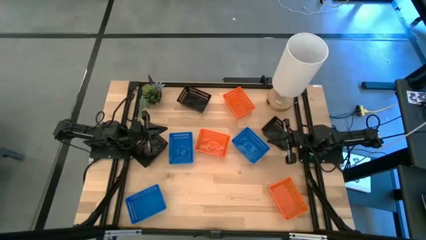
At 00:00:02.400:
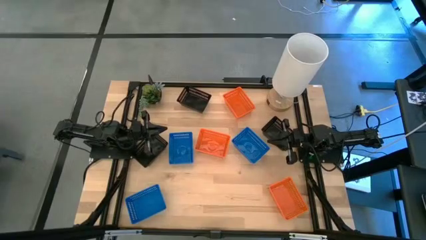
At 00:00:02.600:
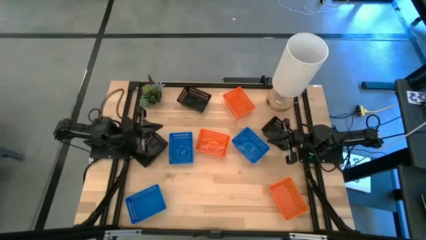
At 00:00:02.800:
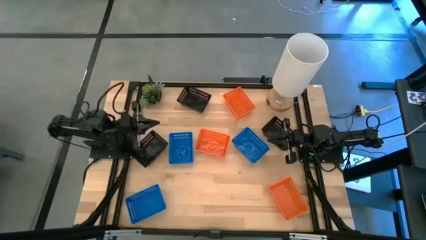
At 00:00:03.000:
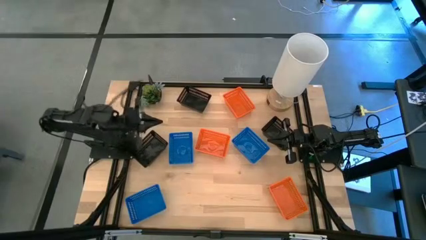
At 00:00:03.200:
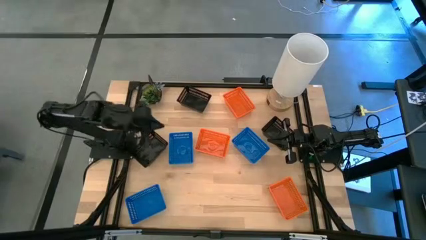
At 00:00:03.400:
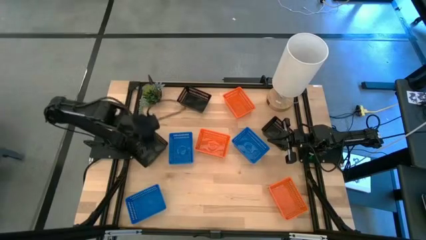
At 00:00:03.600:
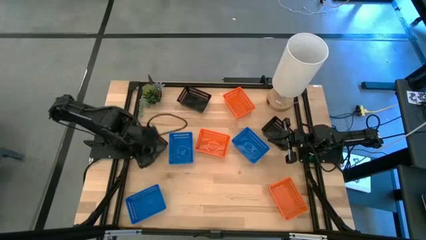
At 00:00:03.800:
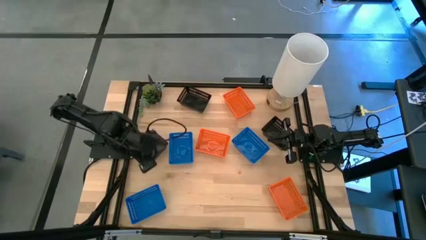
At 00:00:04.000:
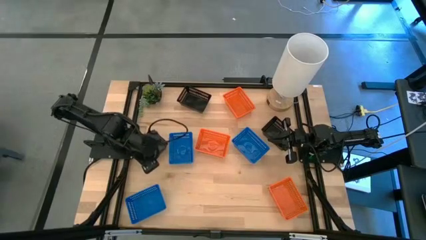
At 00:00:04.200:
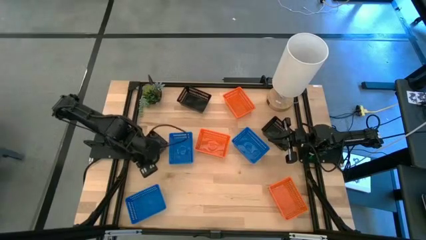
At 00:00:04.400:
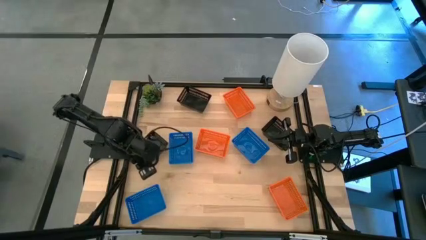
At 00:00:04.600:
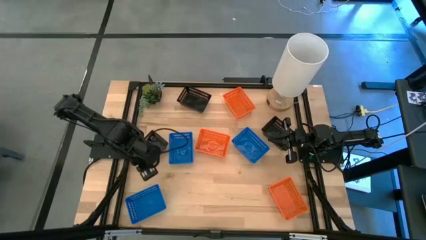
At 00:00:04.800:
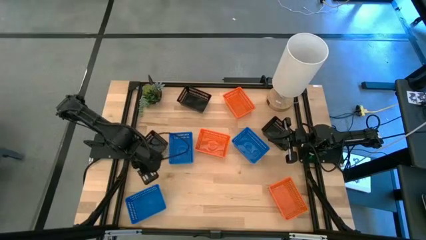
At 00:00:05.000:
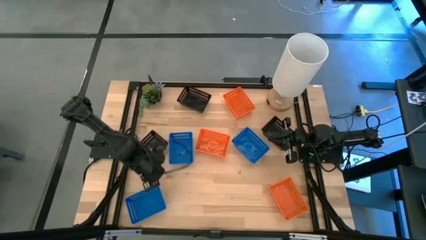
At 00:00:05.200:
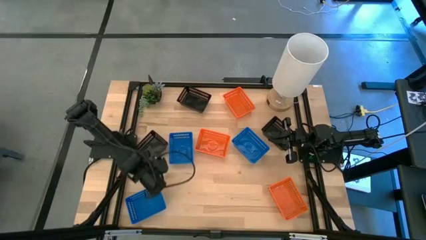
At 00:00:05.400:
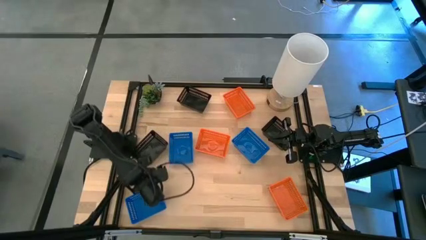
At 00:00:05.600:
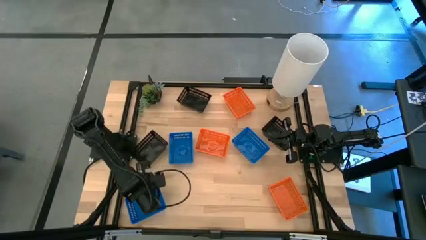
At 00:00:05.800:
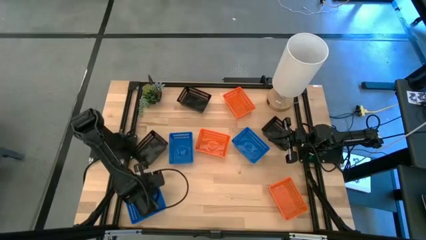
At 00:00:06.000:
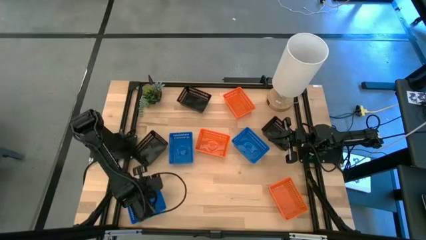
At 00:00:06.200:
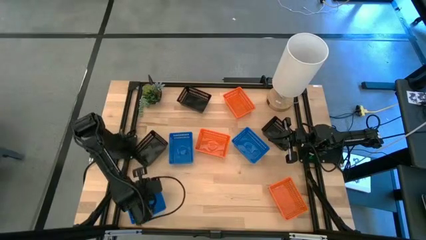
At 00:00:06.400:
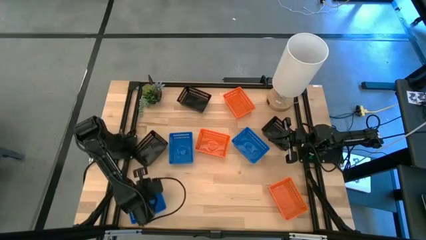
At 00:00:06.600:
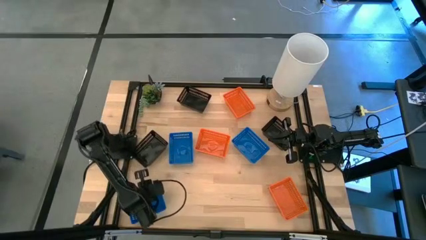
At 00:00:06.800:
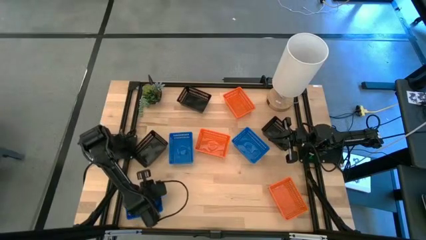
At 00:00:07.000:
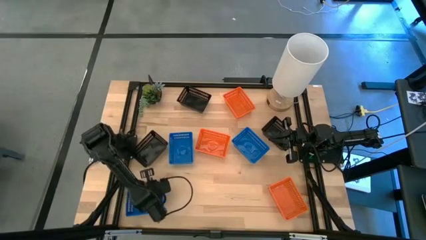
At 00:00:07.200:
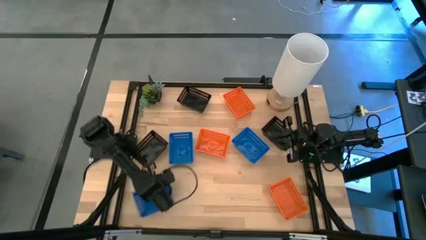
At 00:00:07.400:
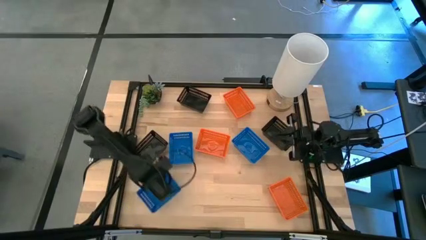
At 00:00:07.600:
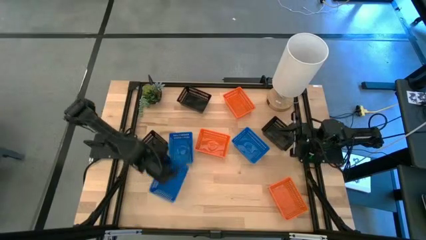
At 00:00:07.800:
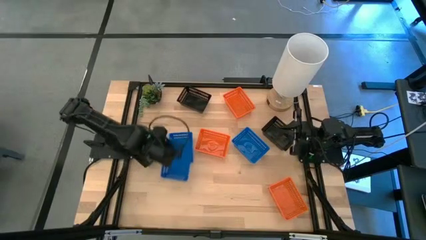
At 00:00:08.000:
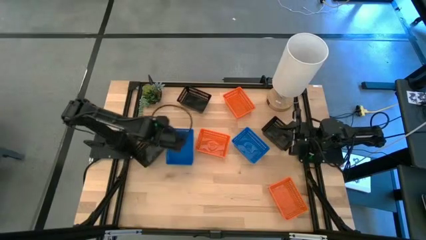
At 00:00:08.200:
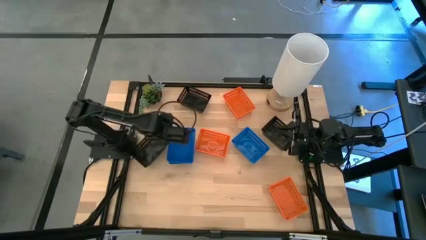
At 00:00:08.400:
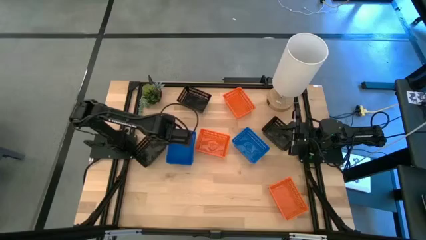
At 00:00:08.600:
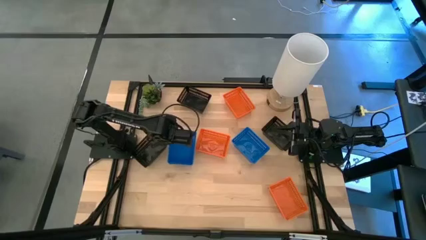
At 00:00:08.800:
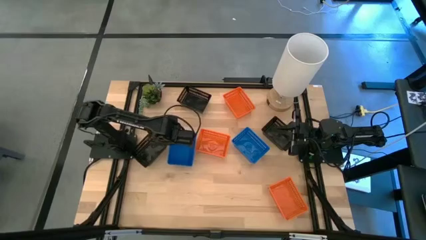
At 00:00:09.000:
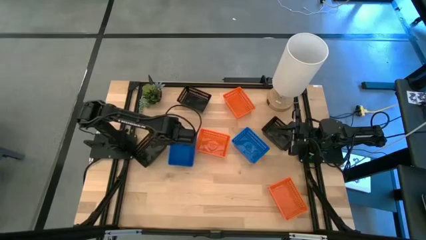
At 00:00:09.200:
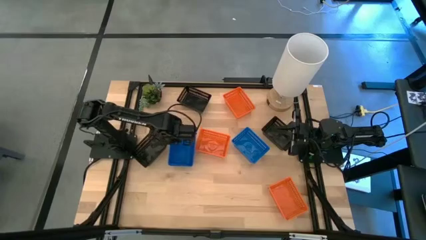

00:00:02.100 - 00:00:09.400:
Stack the bottom blue bin on the top left blue bin

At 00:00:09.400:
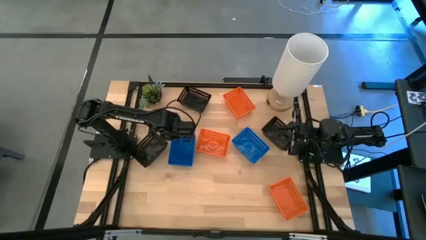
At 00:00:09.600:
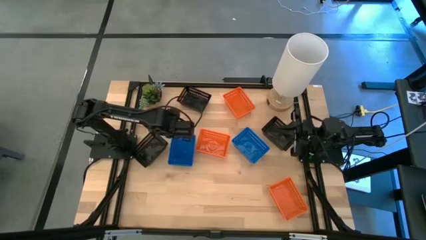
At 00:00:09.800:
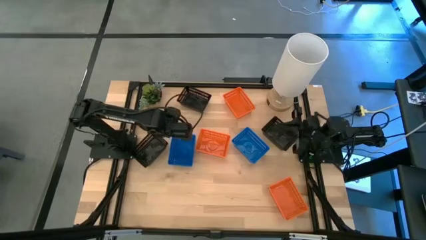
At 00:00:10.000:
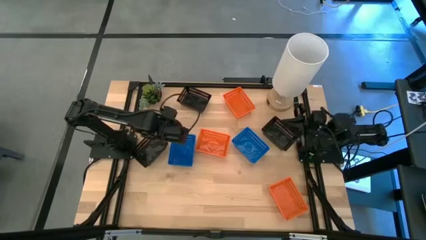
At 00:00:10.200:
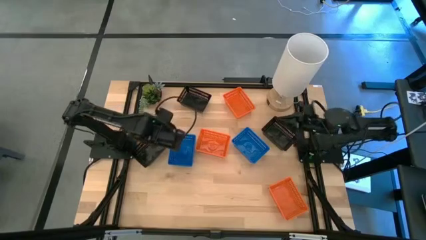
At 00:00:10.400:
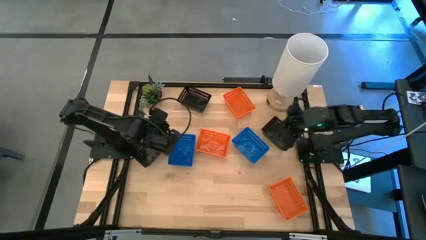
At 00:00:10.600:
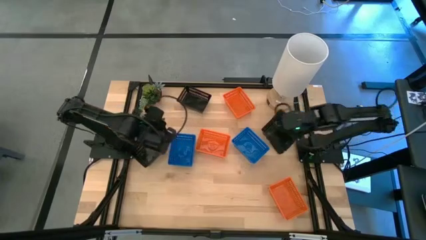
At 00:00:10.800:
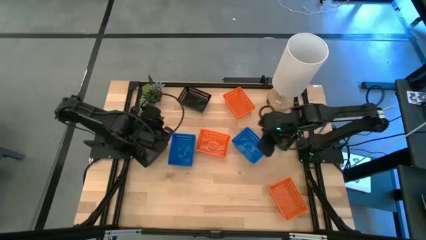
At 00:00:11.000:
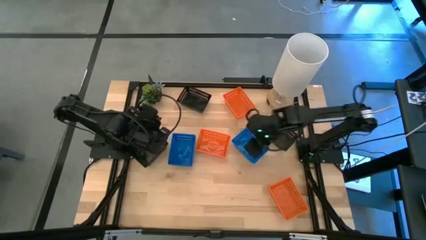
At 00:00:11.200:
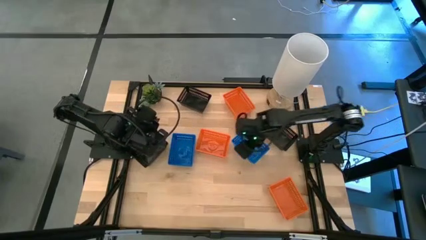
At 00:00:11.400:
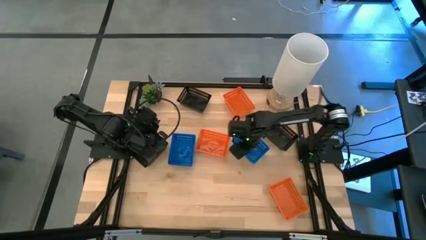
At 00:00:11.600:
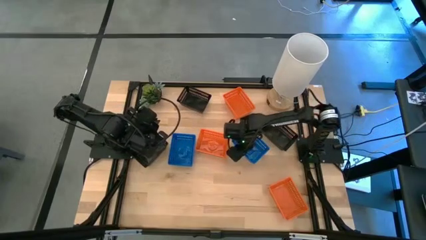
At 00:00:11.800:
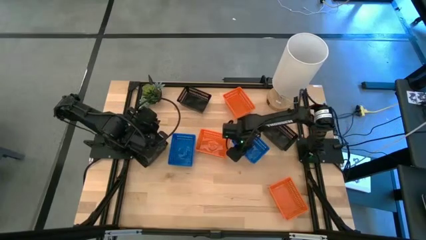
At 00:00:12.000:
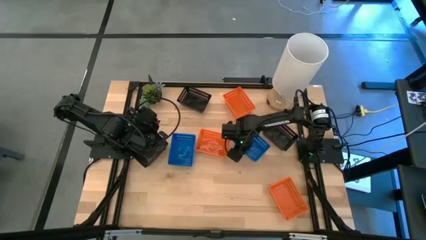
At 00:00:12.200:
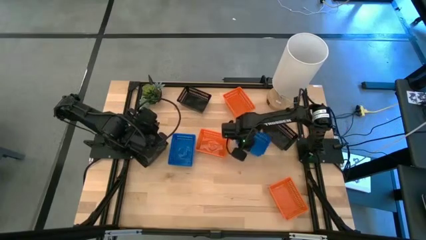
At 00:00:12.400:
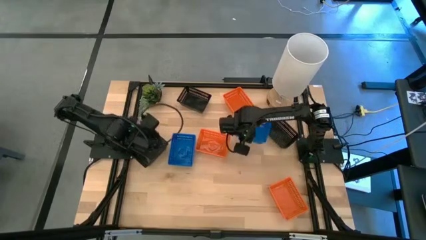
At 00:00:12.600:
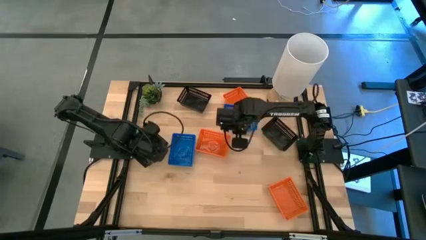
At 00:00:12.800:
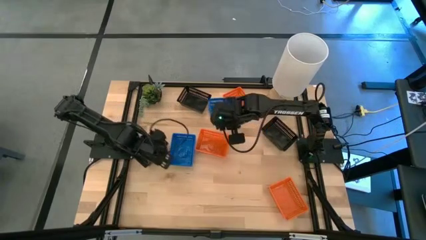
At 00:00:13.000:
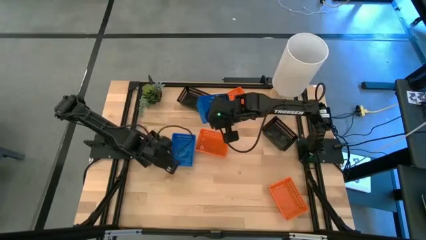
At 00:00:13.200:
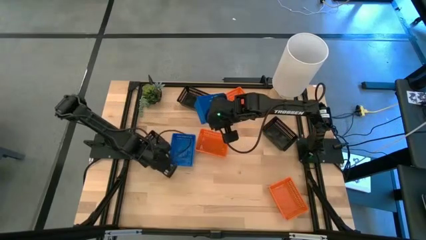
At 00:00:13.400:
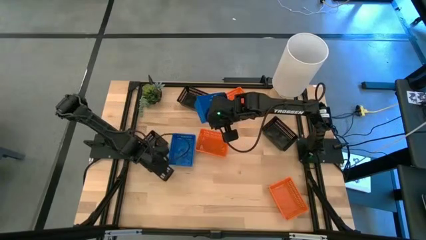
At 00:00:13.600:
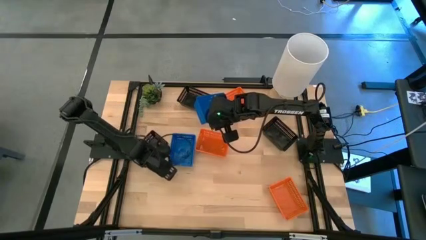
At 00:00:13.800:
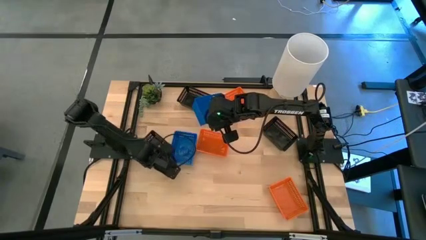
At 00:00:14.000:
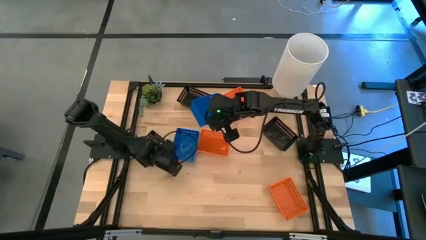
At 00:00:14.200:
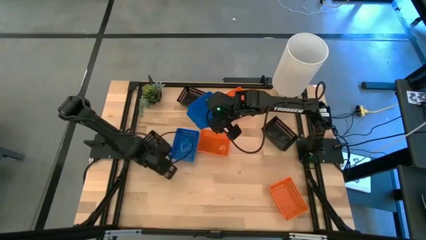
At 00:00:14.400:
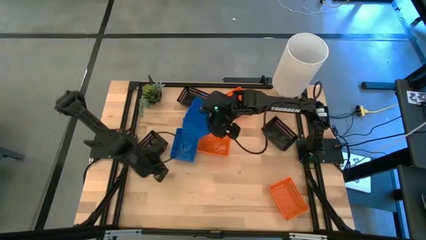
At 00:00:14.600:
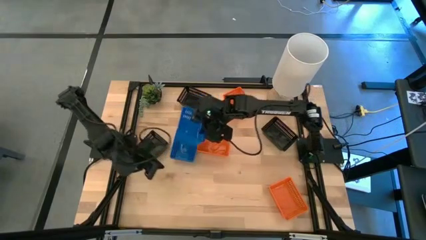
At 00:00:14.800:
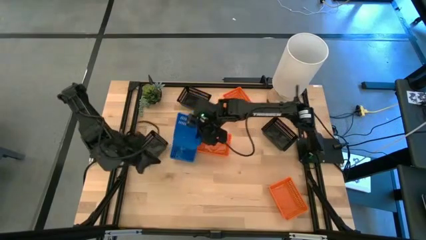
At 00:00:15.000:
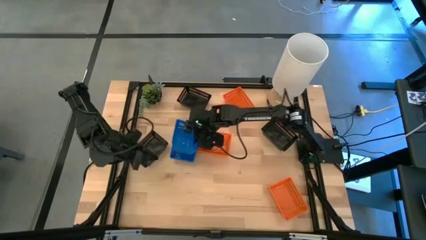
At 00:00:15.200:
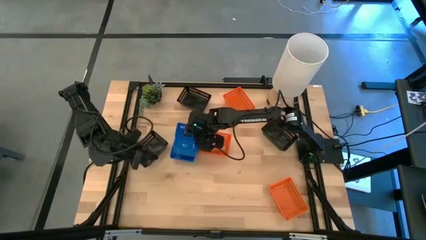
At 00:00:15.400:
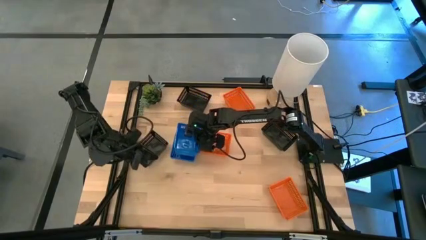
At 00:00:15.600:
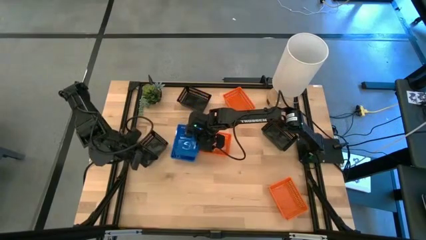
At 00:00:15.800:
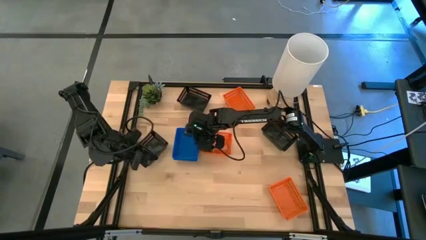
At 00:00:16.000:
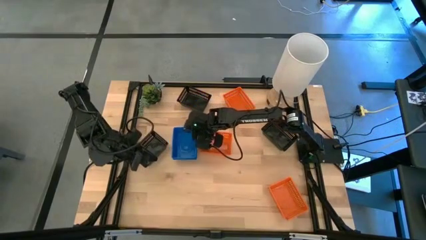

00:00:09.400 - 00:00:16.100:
Stack the blue bin on the top left blue bin

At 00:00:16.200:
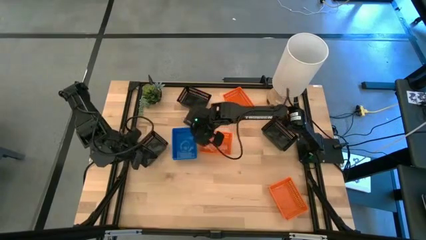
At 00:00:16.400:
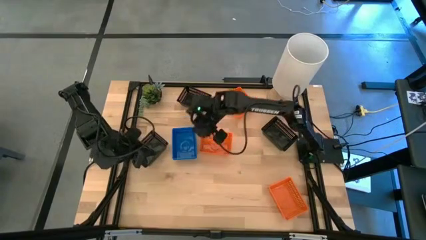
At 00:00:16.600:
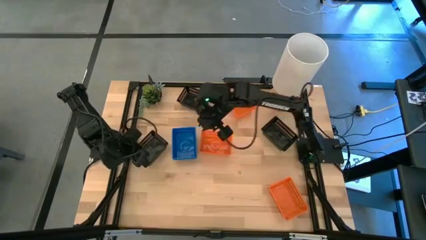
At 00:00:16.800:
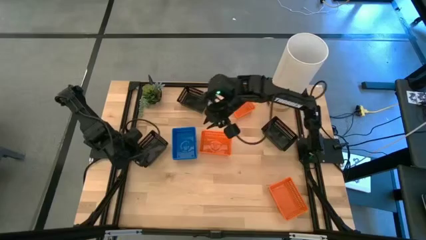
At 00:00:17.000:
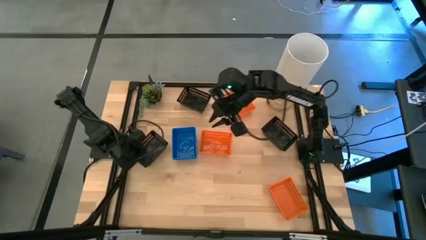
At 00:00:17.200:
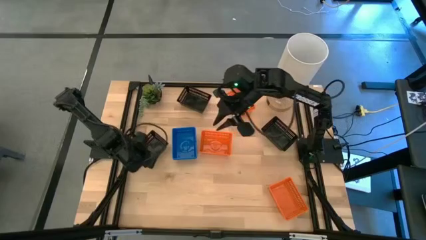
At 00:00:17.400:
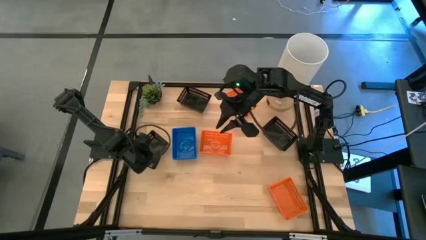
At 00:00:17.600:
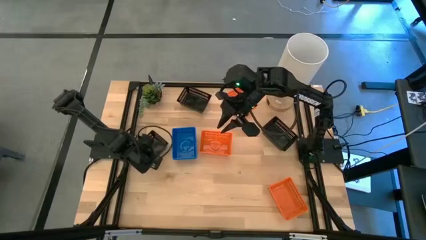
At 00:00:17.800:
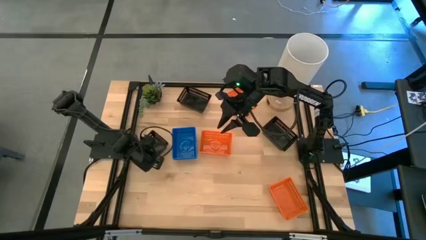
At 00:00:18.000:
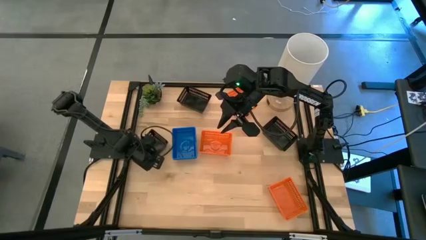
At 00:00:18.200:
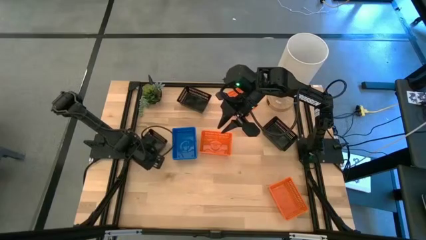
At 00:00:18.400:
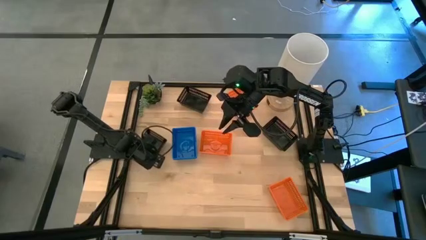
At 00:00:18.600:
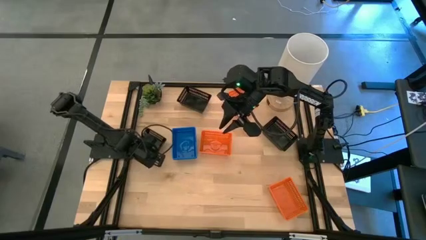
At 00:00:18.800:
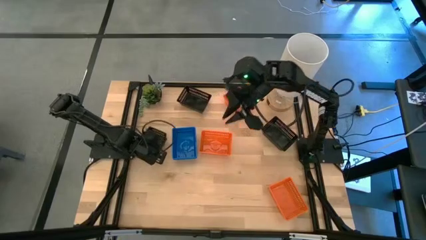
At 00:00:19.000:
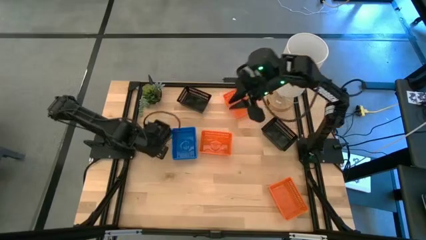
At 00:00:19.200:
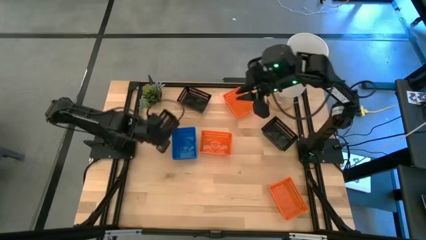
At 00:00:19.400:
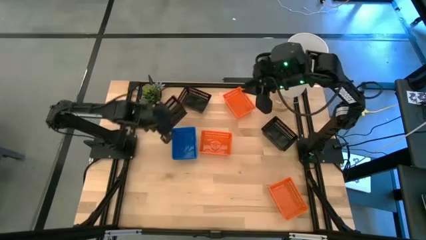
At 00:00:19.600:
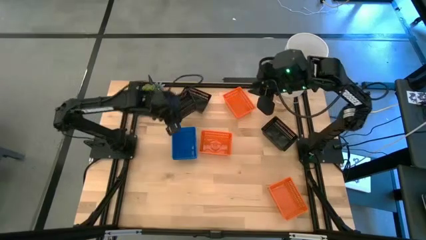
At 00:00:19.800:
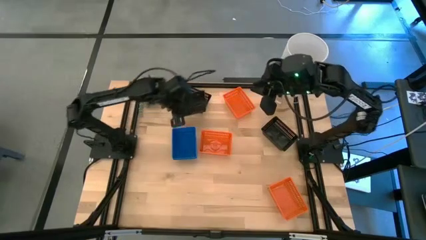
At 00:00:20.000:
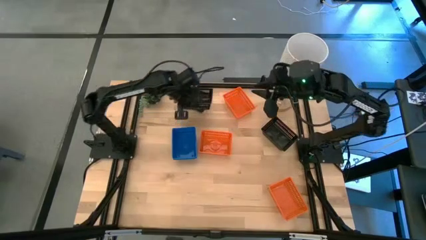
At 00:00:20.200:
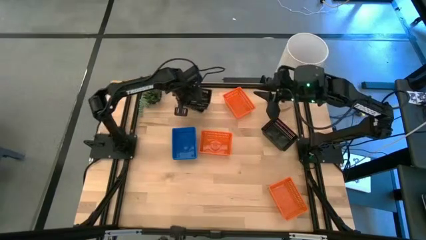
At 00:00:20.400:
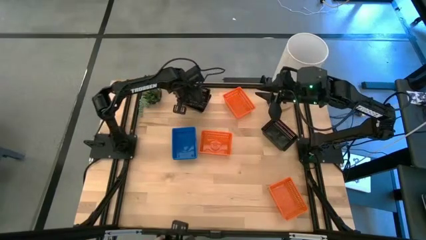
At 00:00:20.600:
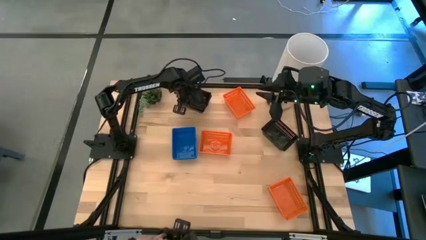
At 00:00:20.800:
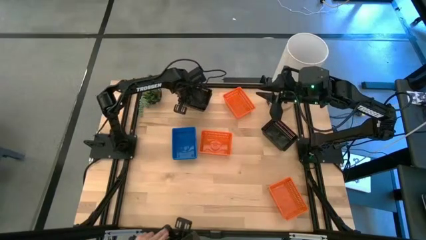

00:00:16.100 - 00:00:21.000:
Stack the left black bin on the top black bin
